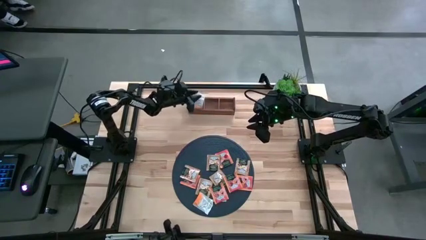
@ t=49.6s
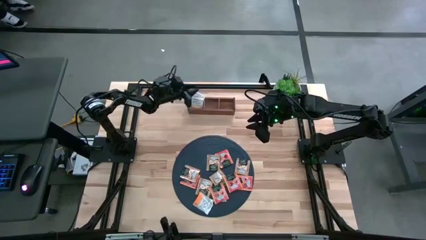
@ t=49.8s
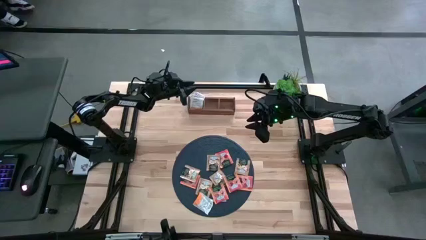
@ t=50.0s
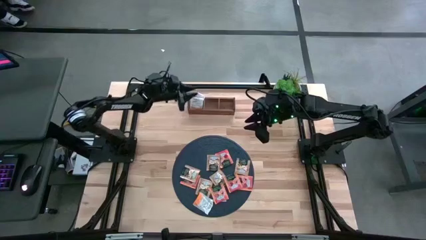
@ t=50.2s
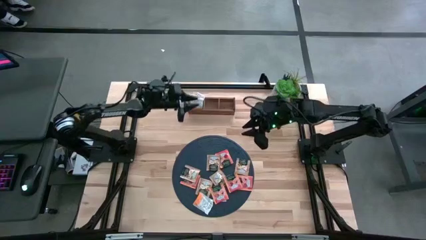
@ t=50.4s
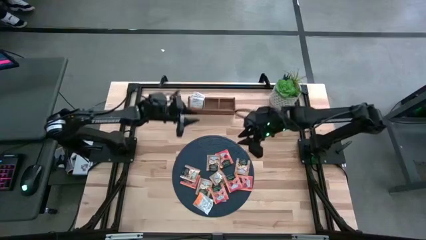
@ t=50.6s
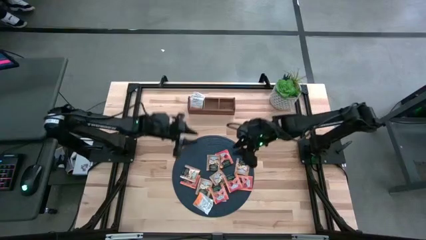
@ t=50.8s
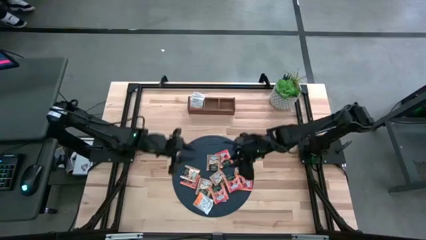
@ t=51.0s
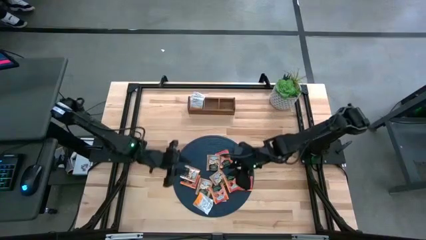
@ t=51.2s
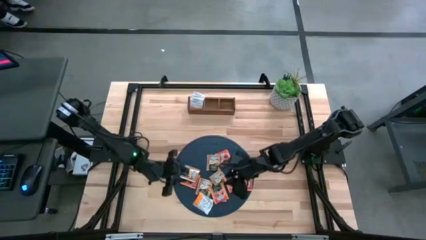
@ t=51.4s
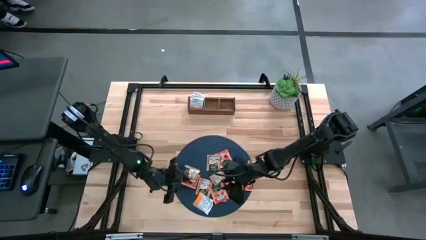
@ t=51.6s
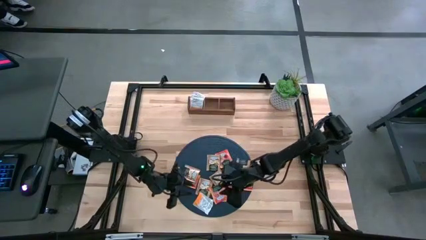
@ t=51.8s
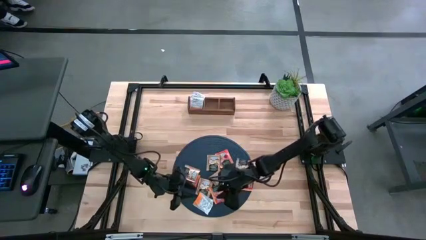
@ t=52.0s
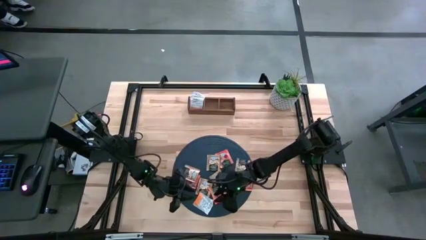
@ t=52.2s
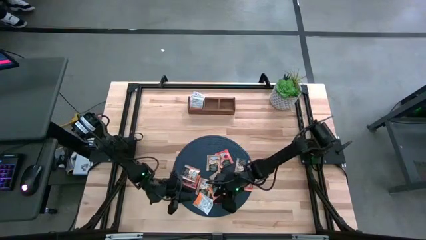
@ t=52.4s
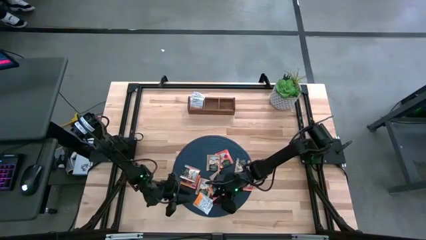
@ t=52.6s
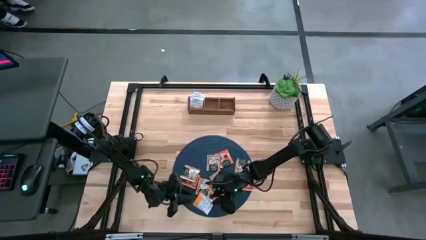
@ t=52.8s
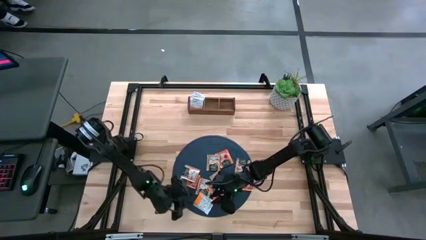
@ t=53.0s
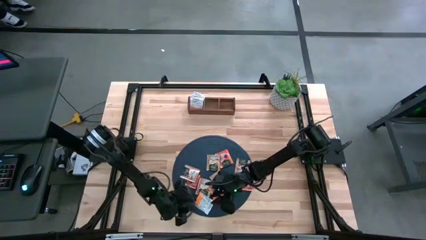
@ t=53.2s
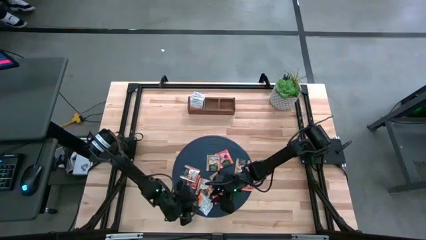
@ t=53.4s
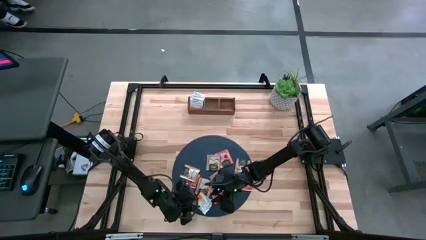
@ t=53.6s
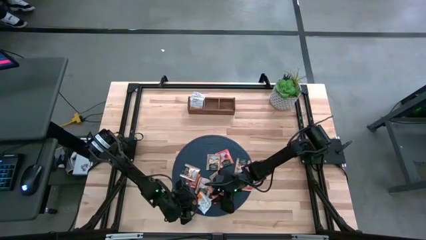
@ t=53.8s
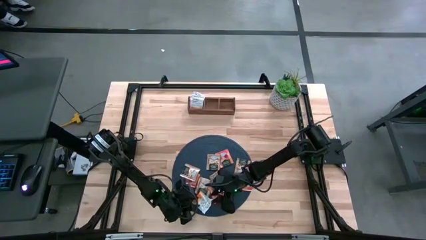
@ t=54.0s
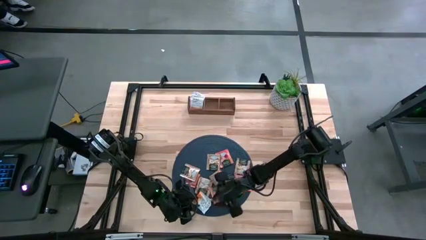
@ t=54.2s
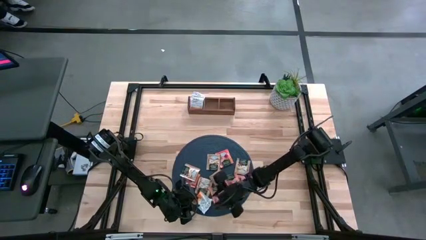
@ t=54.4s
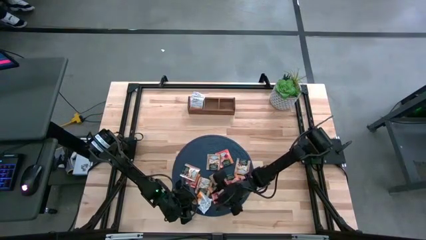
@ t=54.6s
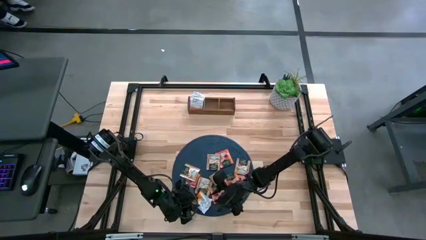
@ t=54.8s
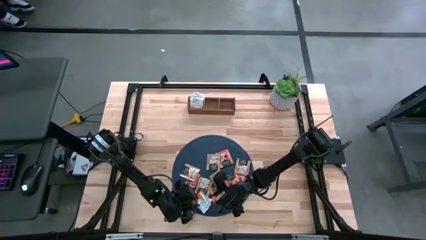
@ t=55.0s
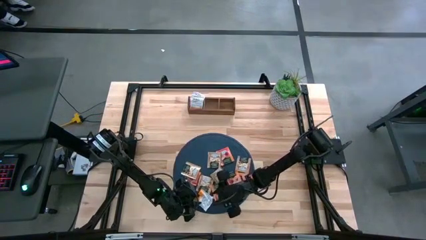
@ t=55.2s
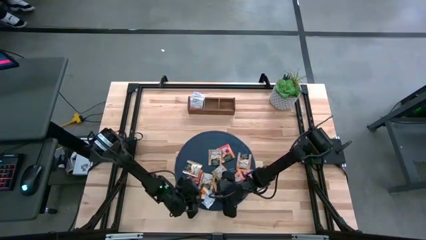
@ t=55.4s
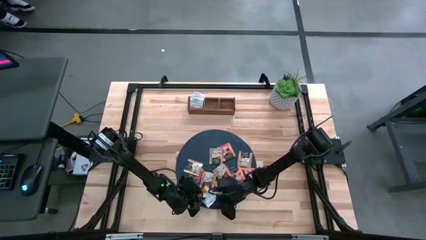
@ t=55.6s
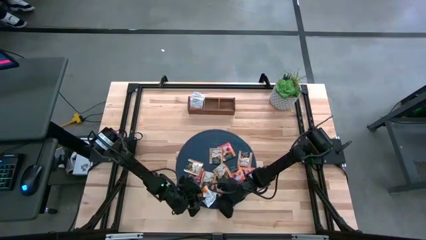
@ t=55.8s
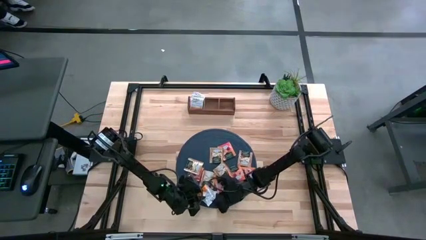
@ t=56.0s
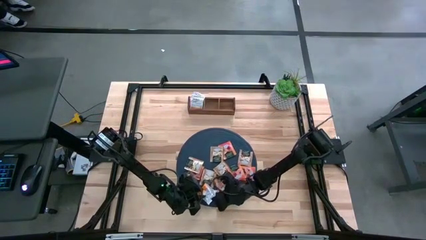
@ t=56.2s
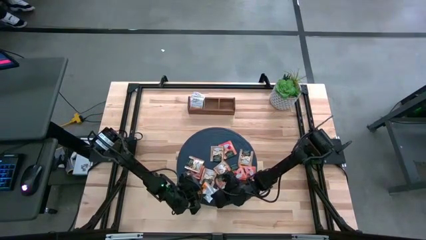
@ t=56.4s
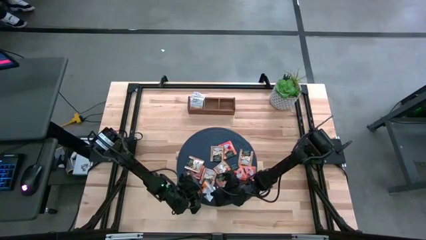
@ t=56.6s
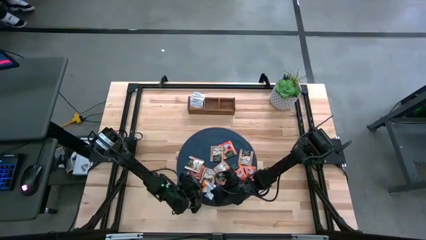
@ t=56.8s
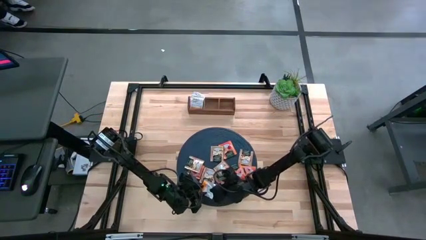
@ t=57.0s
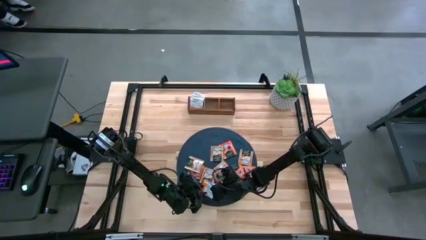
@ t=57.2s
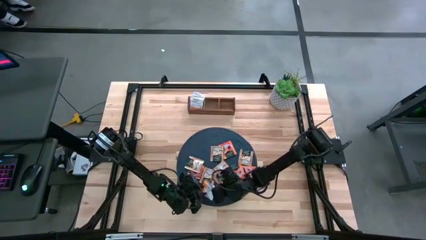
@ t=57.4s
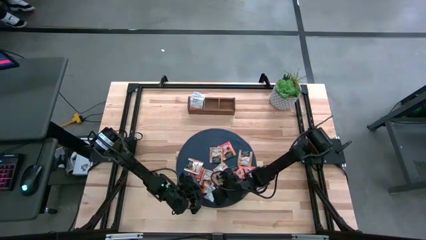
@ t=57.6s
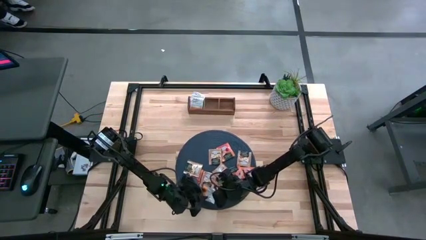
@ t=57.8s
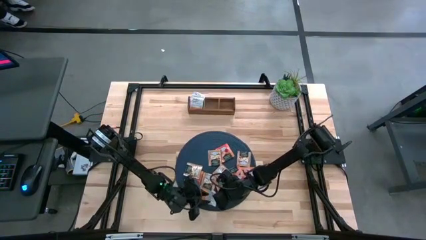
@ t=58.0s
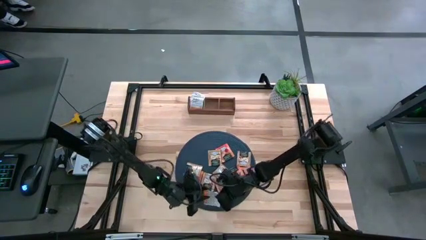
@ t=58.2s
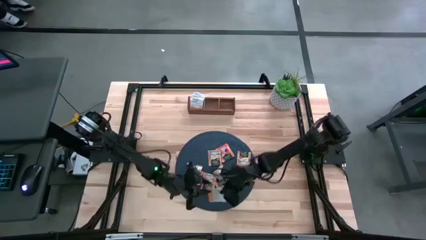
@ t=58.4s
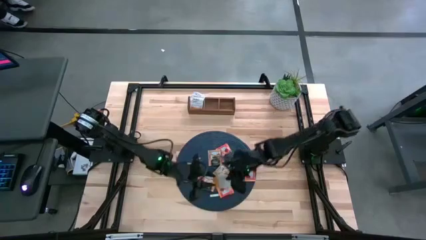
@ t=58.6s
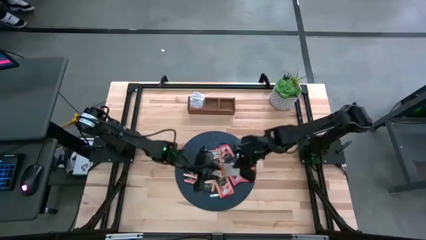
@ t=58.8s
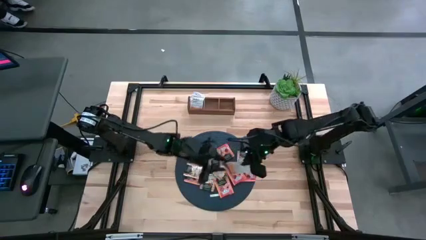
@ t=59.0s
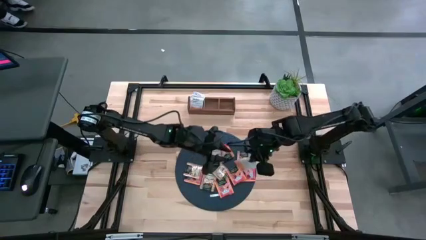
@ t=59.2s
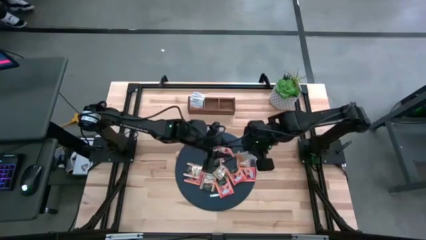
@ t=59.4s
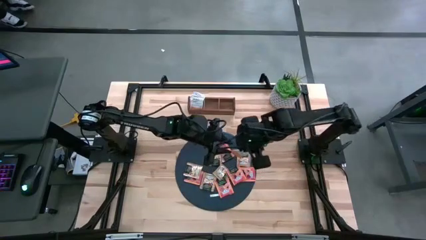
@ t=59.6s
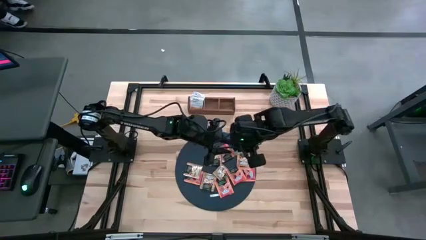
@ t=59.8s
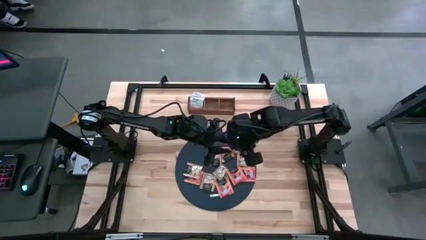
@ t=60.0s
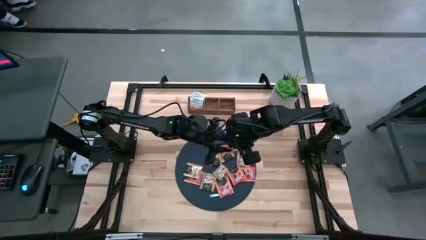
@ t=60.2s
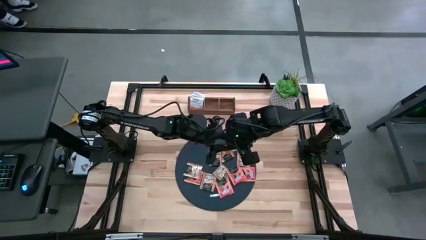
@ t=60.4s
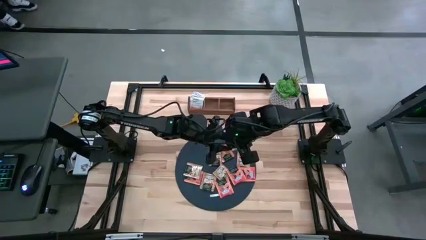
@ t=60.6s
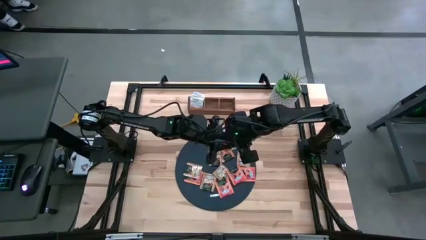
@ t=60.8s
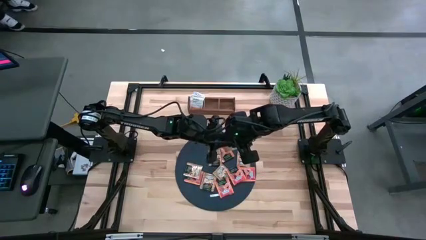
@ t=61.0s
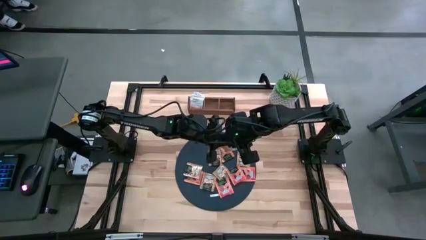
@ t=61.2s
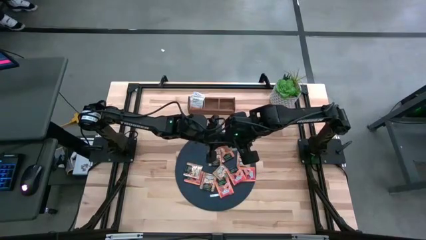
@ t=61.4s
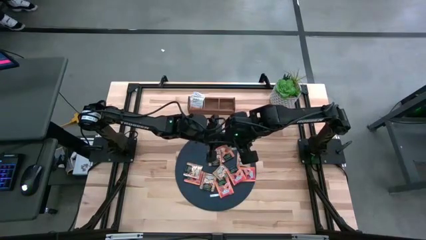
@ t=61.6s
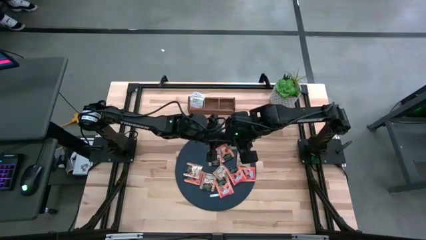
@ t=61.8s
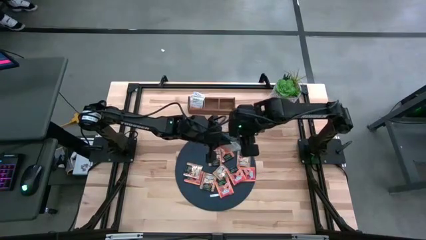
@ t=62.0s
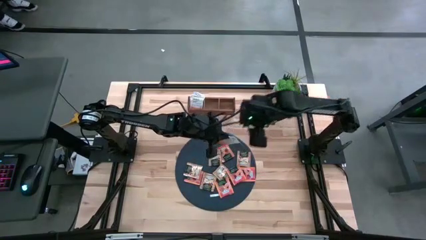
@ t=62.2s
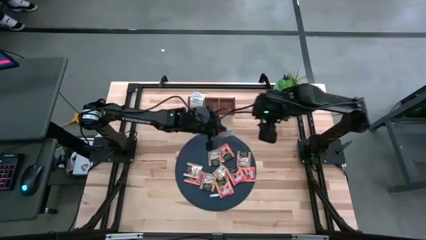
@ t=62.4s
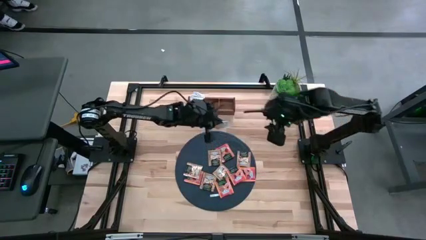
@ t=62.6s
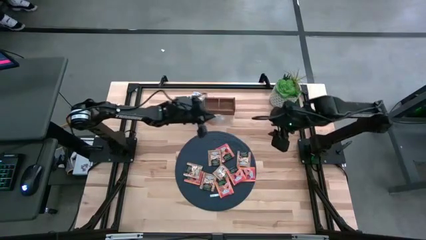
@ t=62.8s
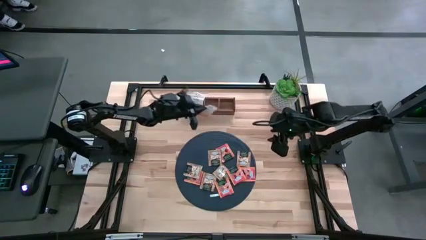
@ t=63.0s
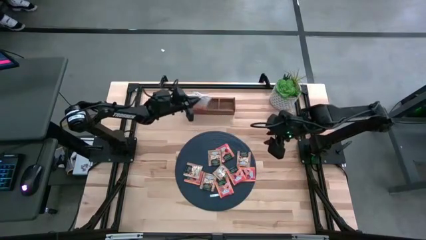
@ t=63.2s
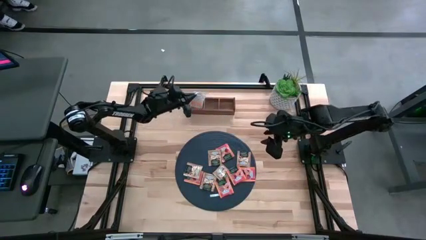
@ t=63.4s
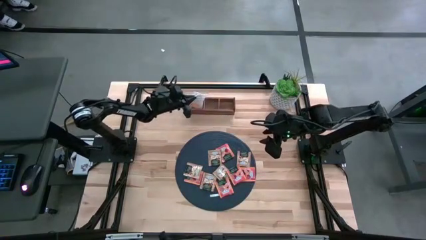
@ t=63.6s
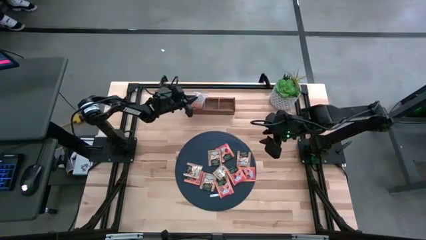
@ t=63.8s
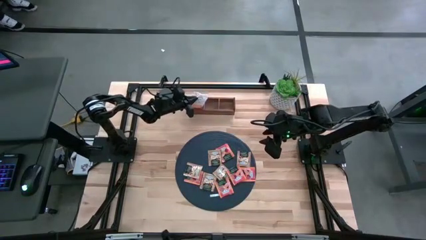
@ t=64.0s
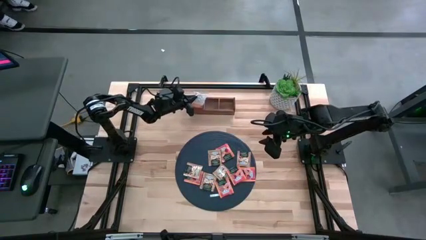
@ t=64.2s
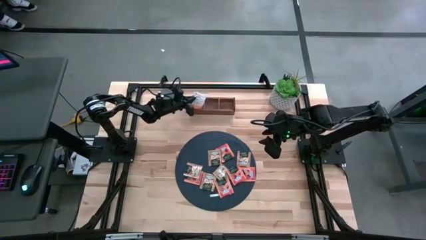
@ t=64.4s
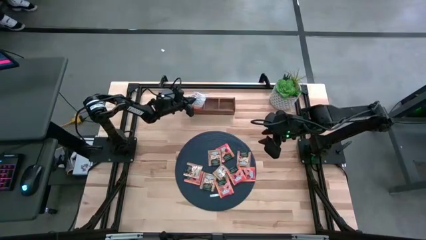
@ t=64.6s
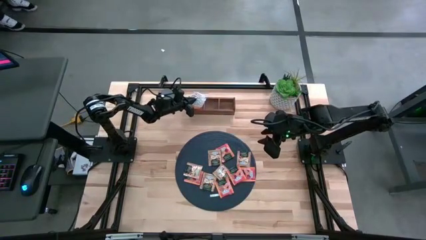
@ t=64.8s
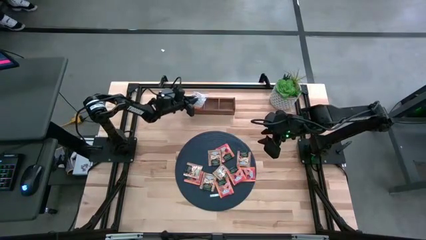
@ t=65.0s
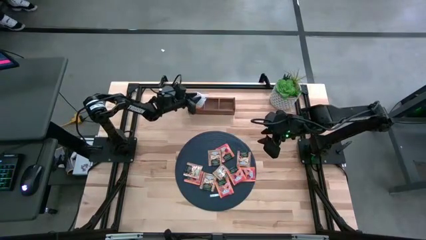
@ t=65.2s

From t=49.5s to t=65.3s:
Task: Pick & Place Tea
Put the white tea bag into the left section of the wooden organizer
